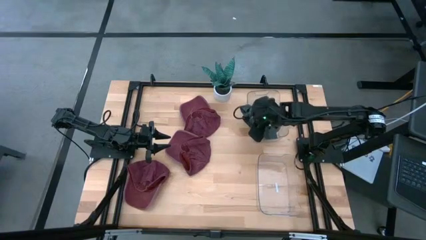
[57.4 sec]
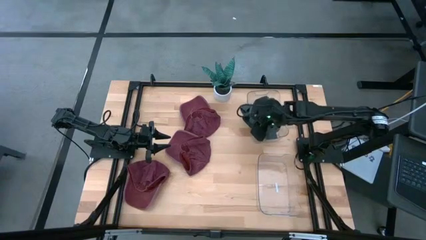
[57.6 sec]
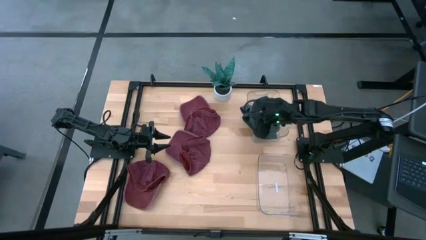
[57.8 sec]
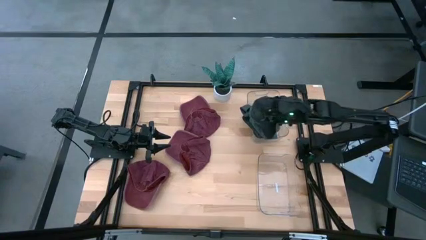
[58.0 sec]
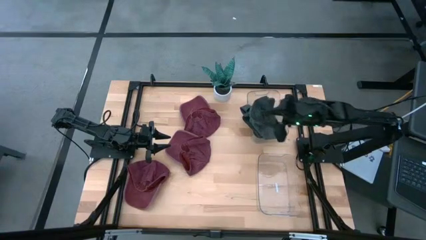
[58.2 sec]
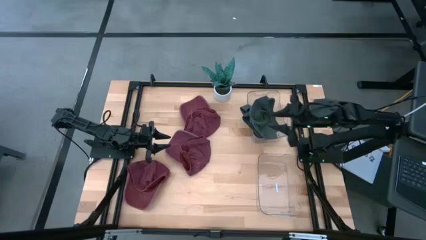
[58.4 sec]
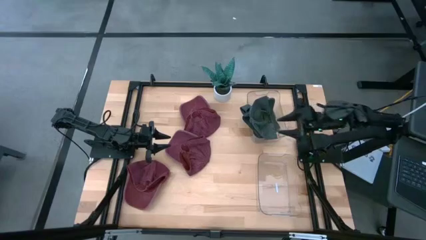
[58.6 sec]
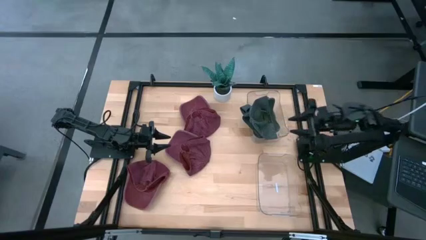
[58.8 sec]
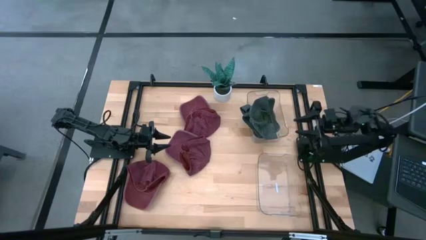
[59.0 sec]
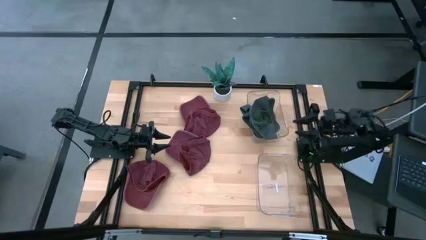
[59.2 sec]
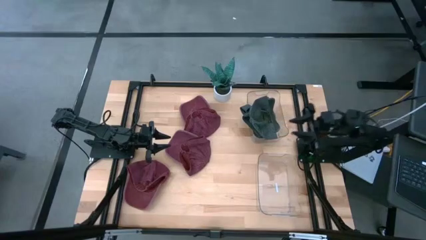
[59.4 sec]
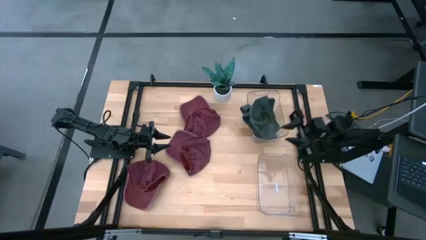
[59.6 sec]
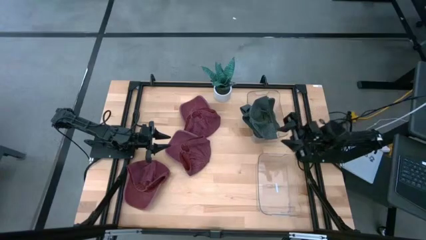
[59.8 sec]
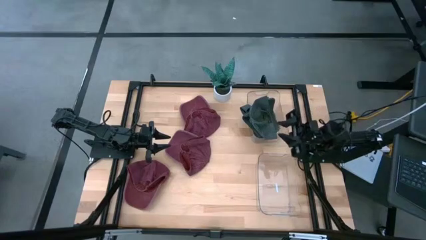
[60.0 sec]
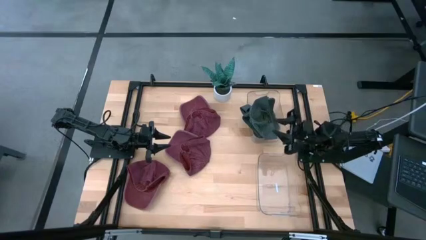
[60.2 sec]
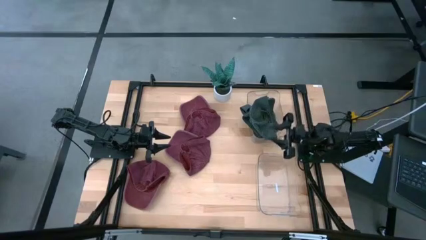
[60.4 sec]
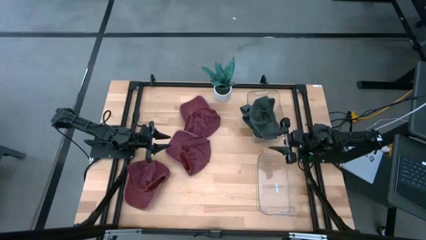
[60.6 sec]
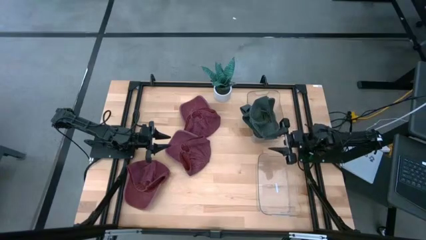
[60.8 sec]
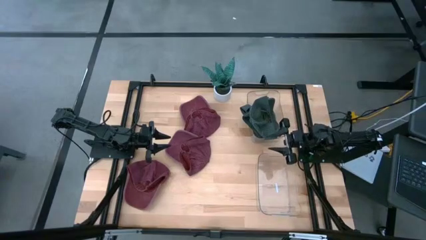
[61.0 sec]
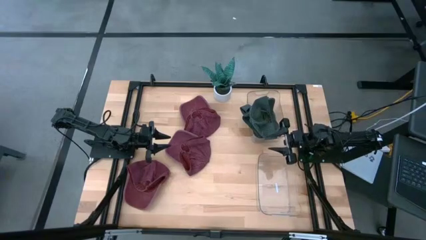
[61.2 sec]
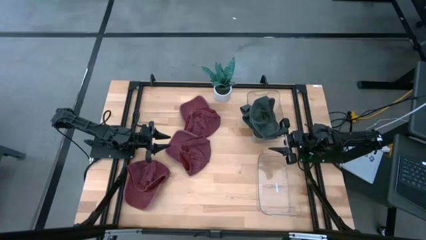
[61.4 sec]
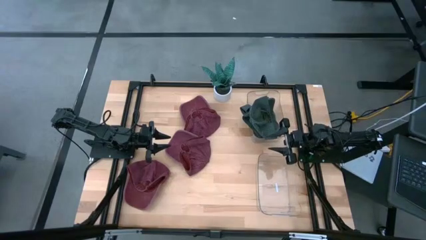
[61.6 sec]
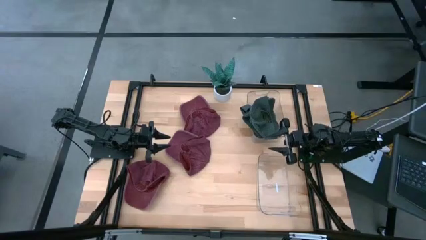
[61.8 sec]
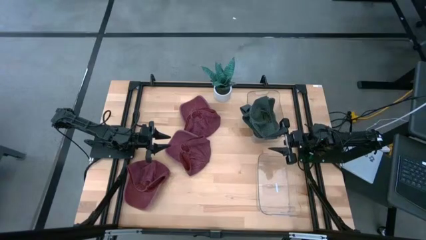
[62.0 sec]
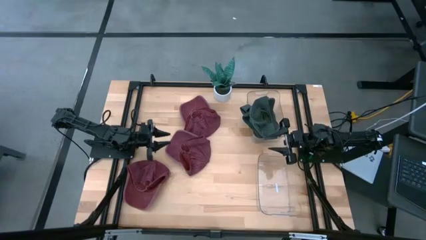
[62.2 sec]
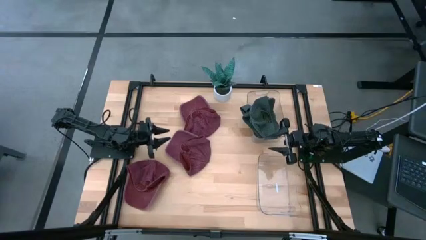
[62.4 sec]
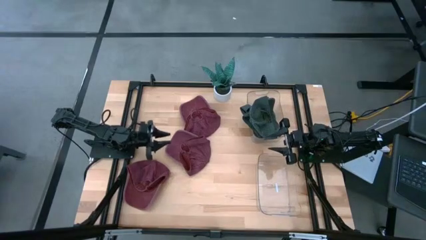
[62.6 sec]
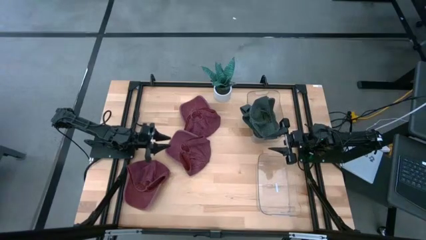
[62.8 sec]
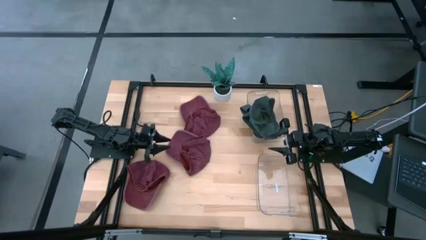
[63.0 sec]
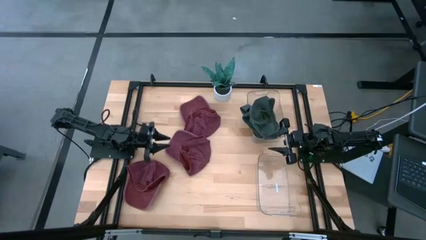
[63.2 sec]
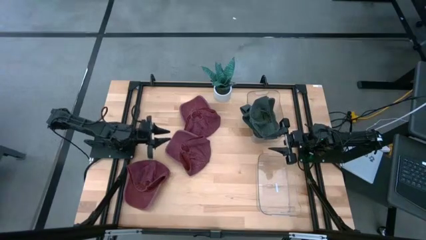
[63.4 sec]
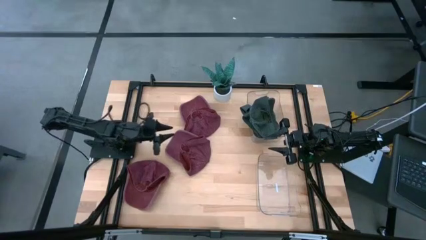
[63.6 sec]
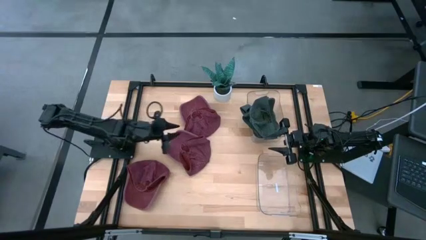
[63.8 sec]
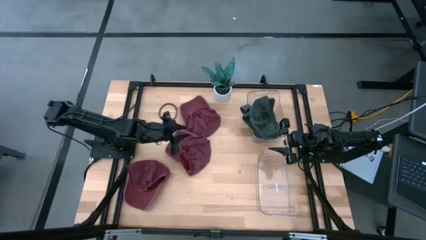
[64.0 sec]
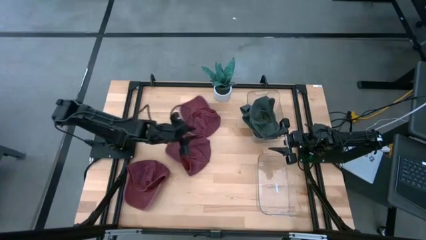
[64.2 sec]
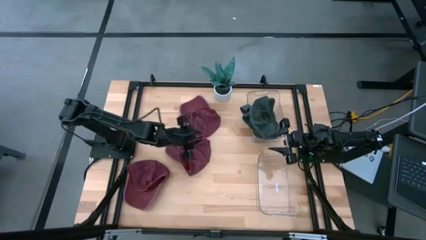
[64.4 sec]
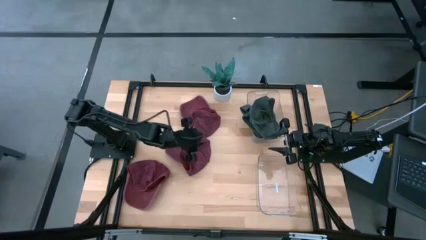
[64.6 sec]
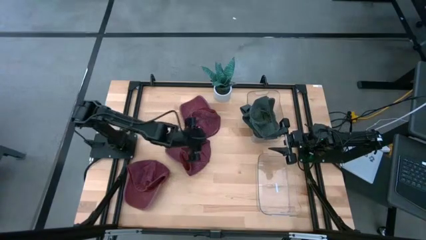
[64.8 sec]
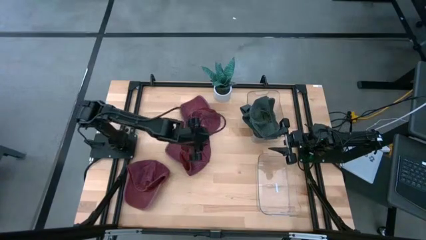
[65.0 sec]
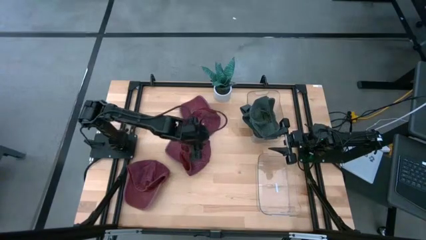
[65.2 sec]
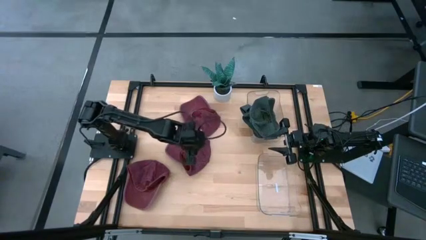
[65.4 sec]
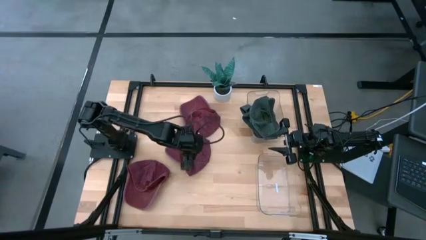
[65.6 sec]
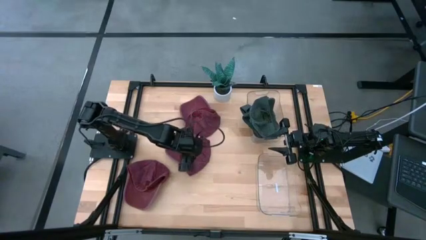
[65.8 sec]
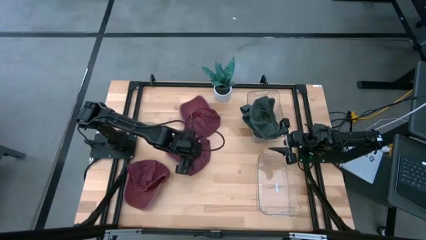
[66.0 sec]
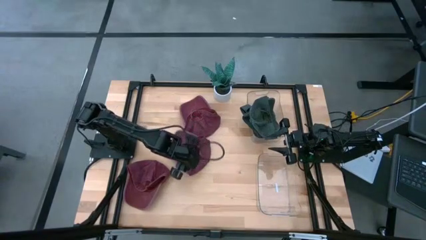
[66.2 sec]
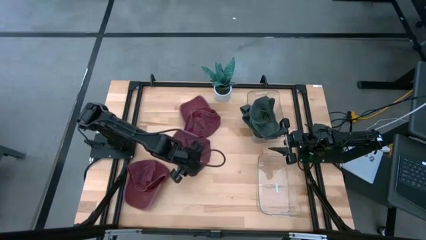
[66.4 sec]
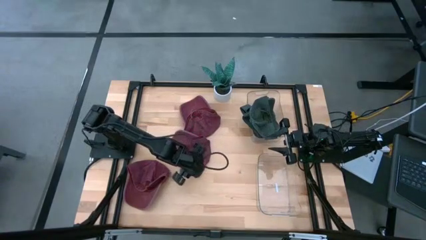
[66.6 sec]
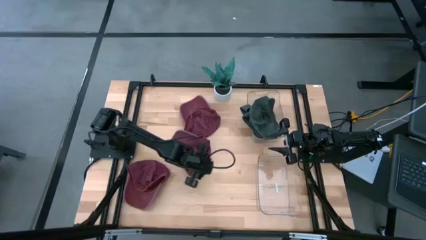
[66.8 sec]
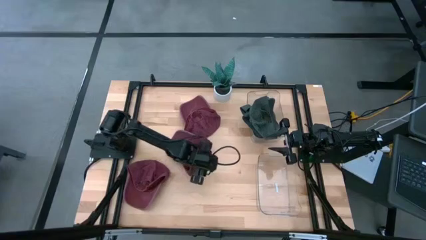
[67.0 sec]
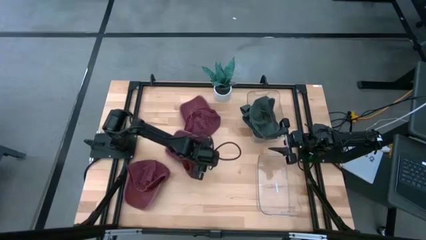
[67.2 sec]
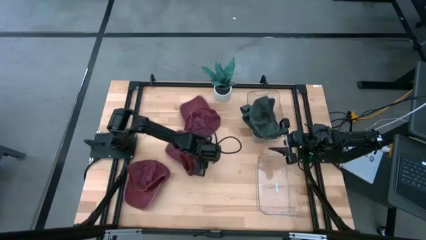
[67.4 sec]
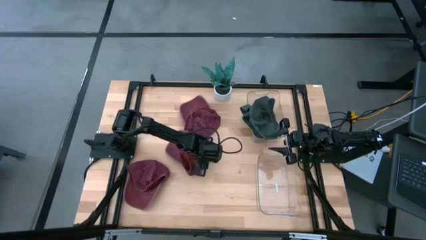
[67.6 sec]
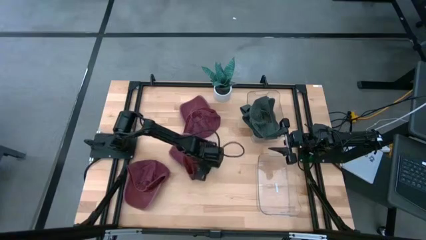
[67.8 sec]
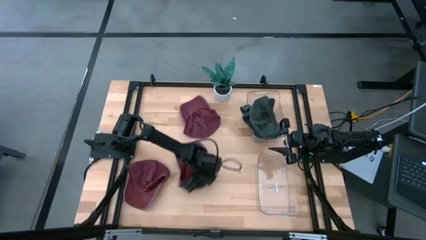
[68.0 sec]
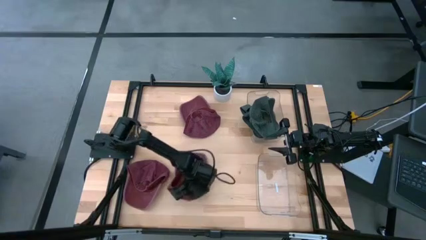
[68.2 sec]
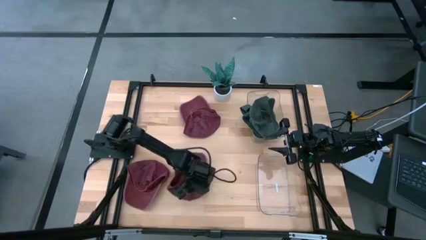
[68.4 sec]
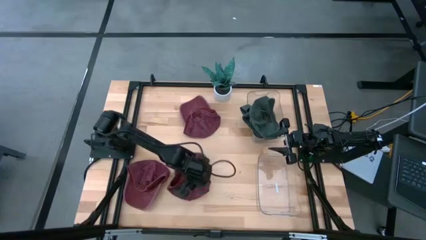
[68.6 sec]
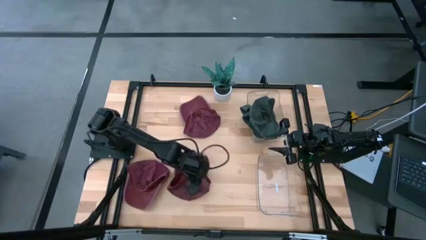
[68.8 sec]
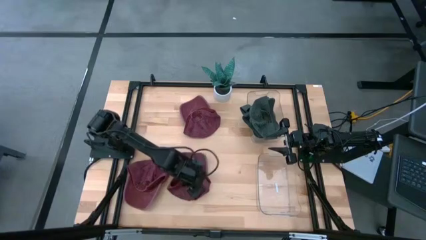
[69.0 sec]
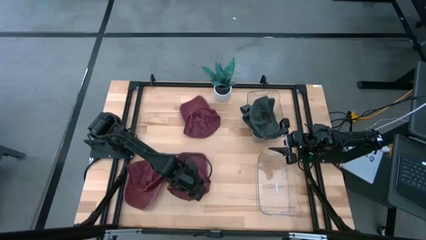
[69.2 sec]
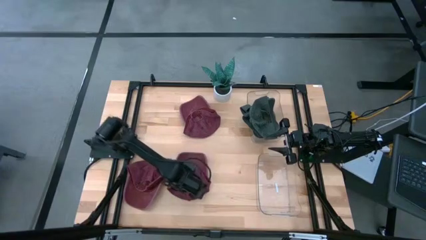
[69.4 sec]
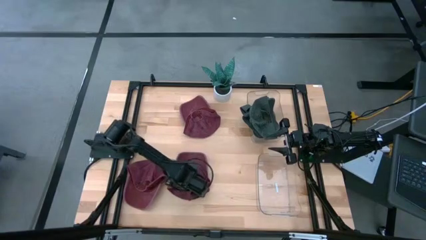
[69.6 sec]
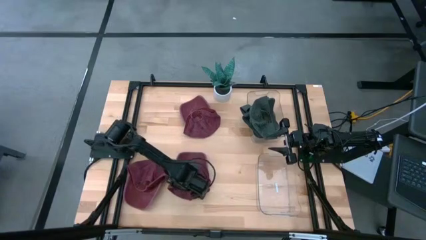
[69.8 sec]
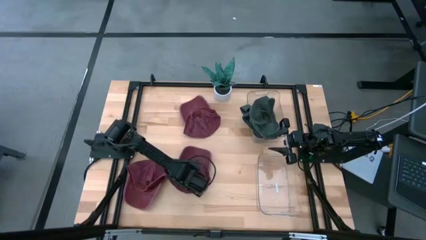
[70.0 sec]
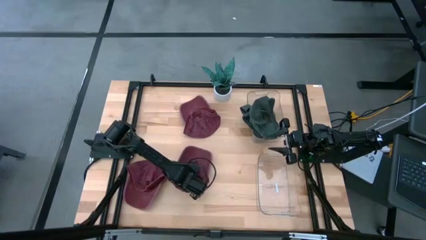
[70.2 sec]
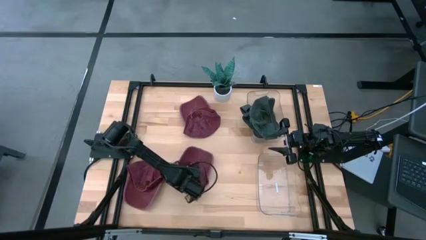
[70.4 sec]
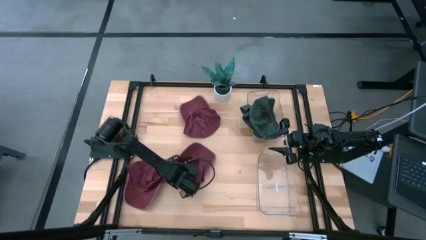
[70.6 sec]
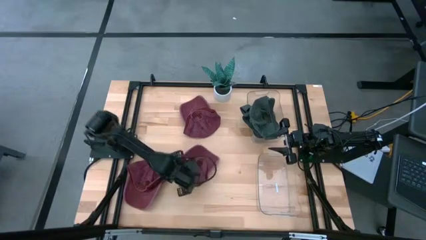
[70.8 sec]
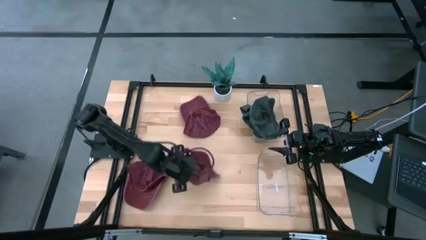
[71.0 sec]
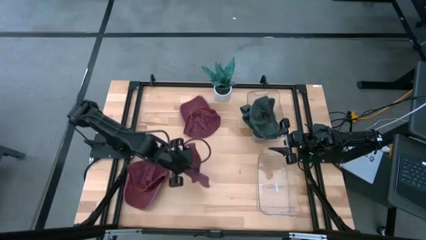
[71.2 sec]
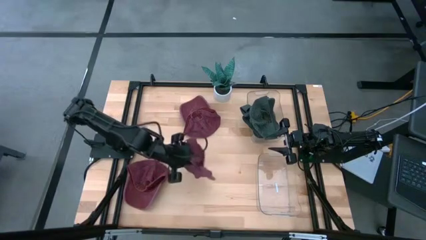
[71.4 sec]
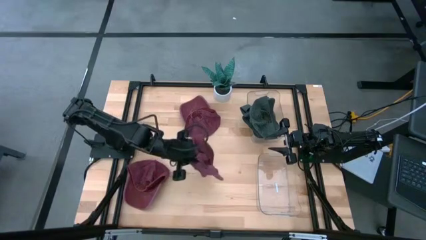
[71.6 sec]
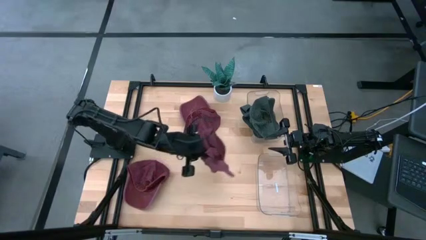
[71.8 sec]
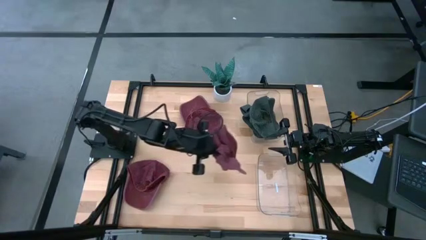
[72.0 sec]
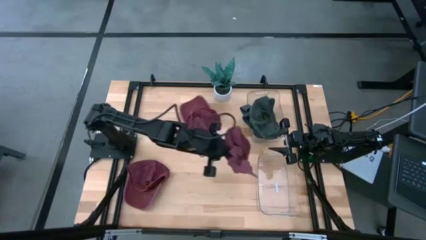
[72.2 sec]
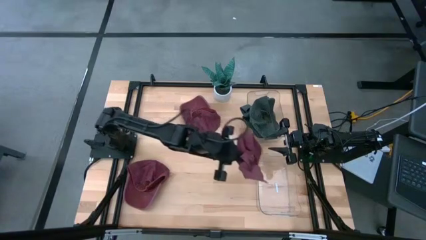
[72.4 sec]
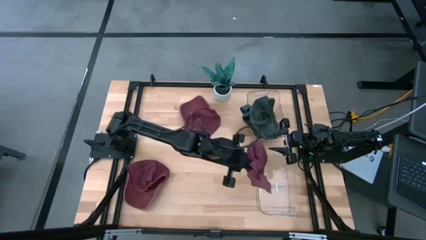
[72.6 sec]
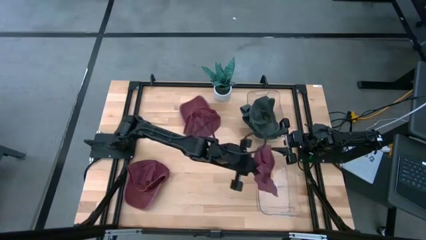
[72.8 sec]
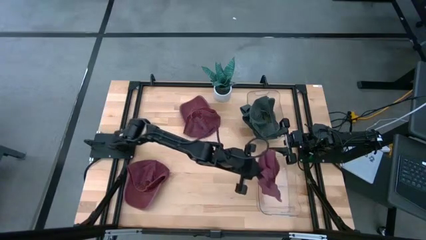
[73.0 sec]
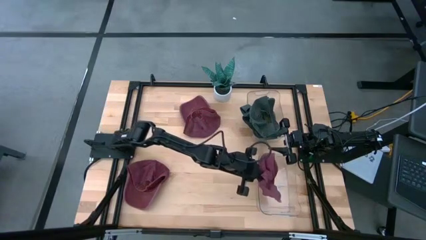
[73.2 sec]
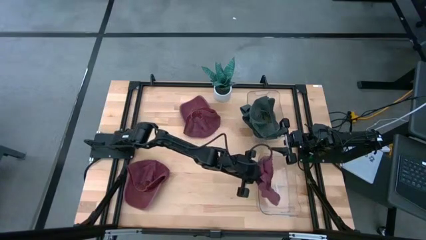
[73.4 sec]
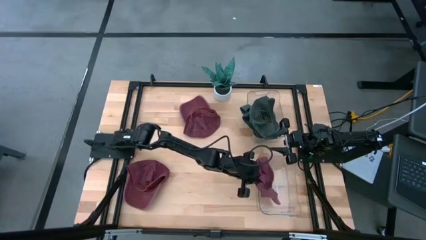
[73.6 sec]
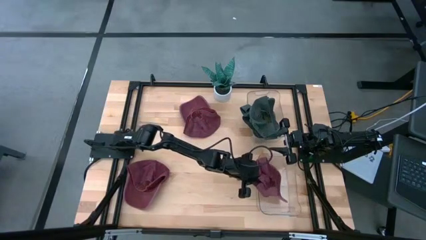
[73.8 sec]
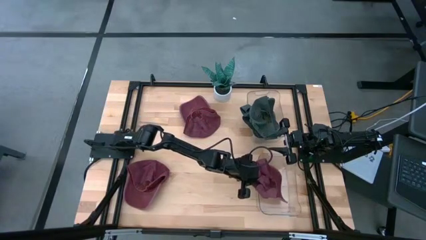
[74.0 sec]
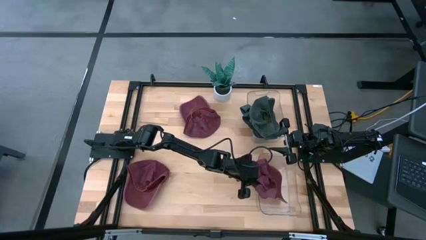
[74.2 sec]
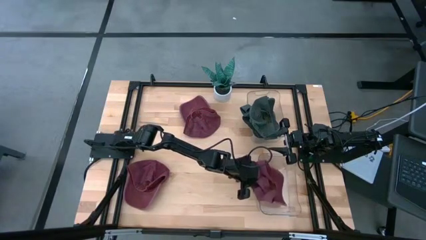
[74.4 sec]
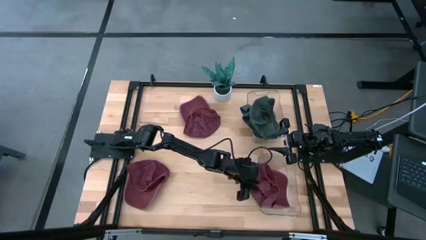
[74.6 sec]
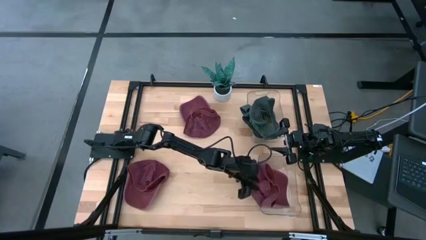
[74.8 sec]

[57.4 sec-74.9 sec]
Task: Pick & Place hat
Put the middle red cap into the bottom transparent bin
